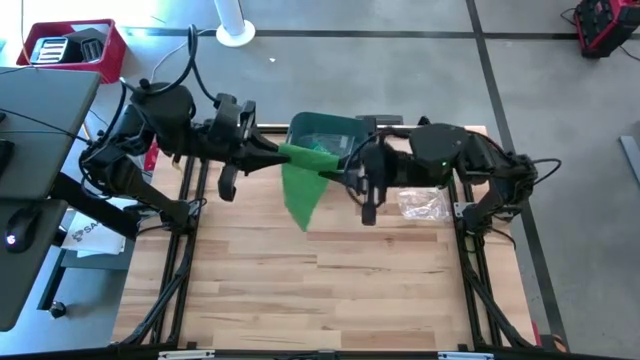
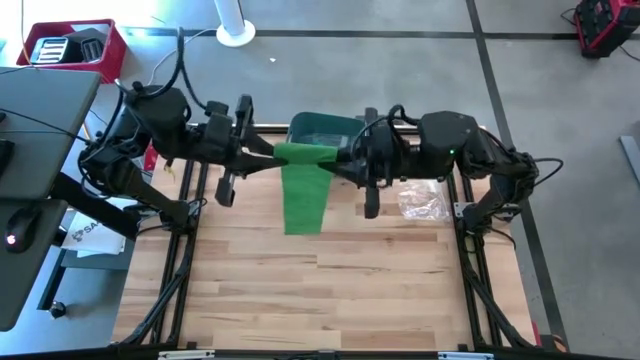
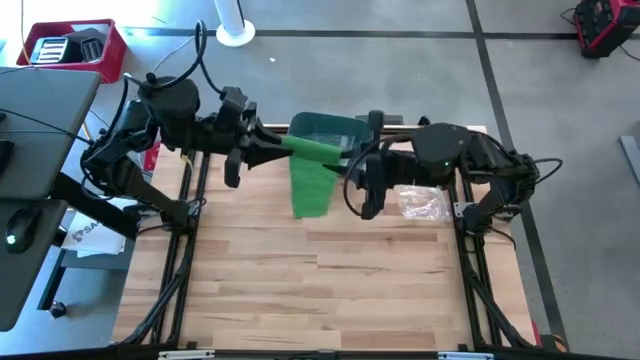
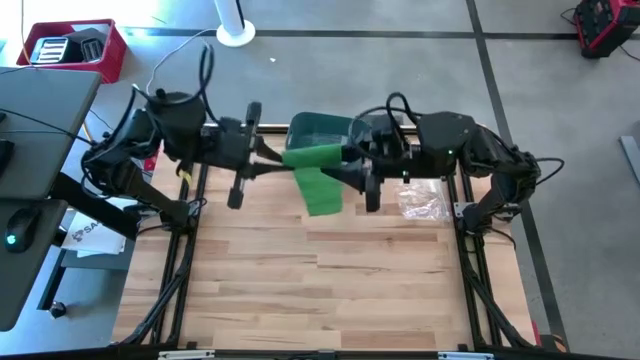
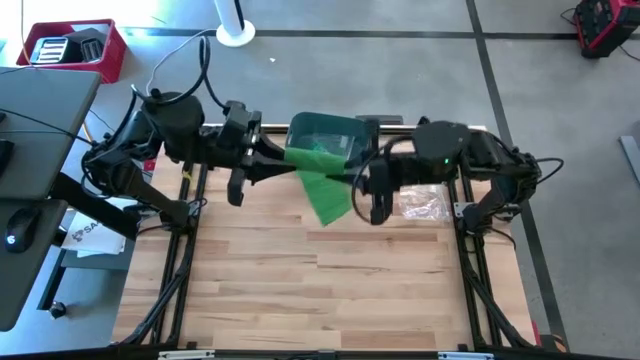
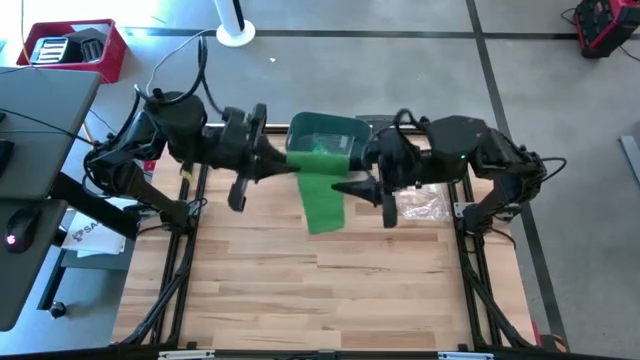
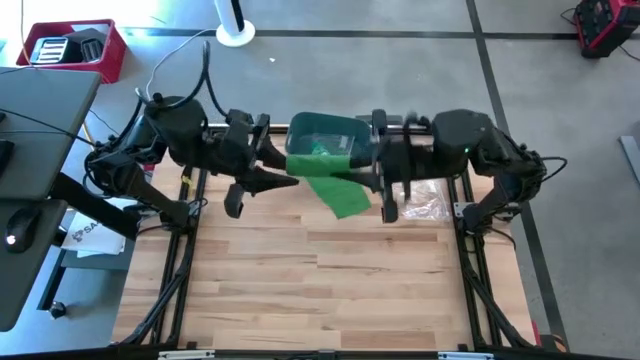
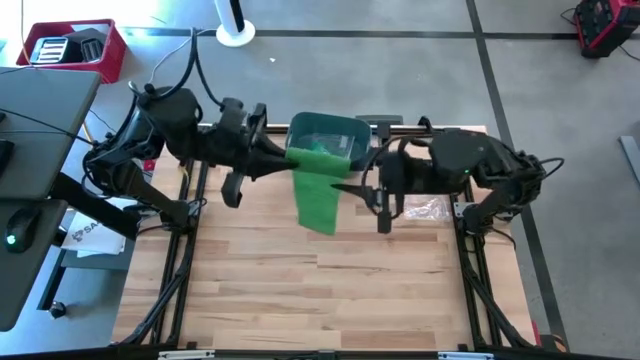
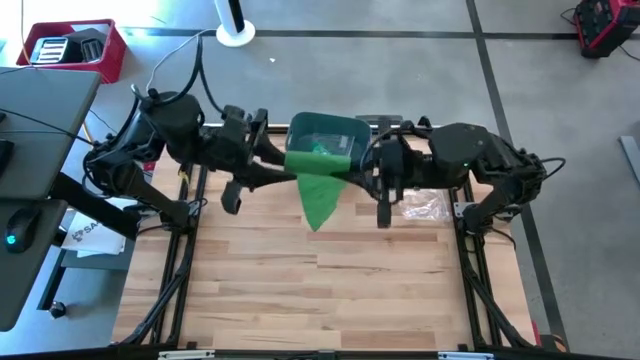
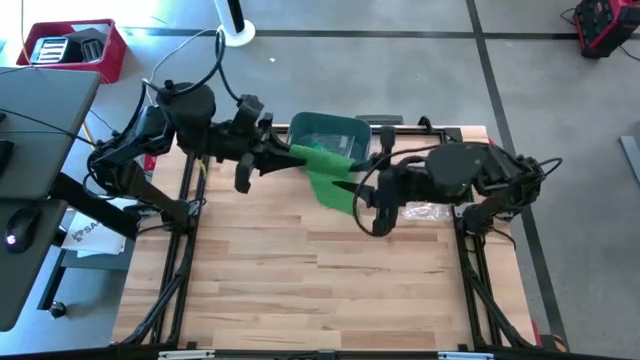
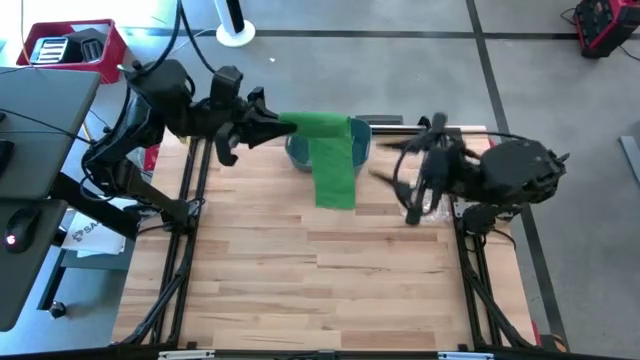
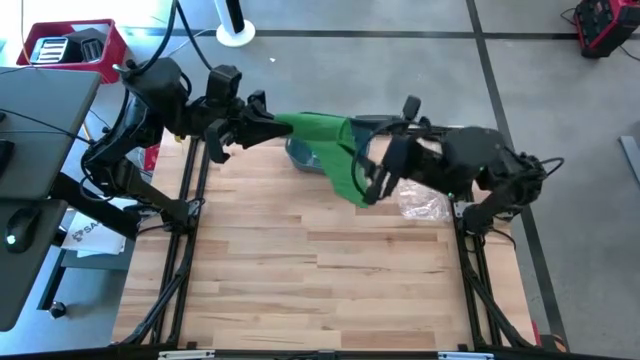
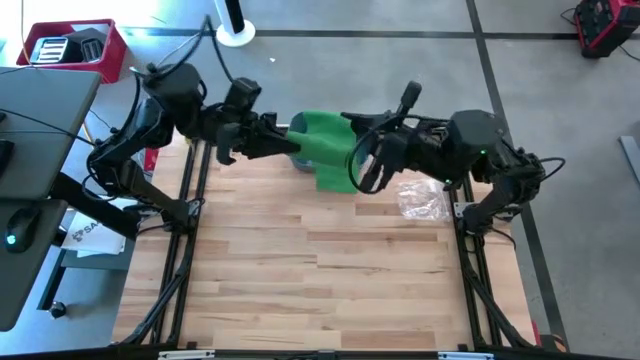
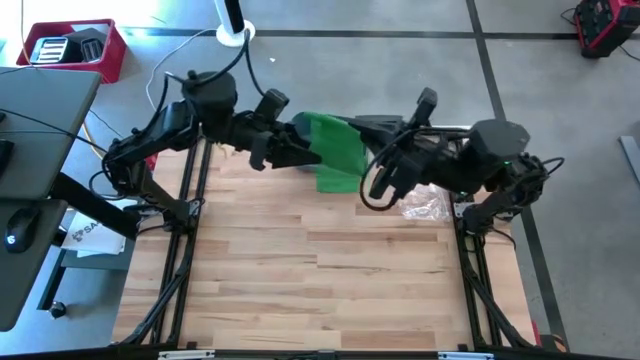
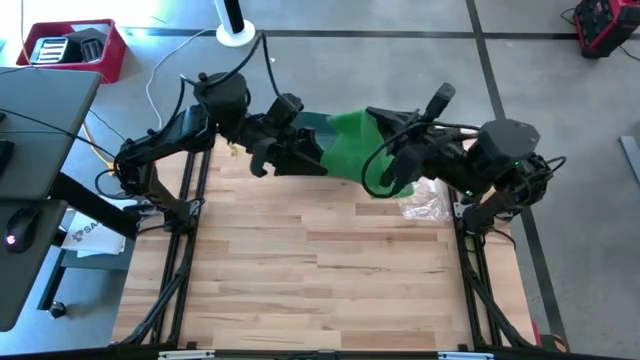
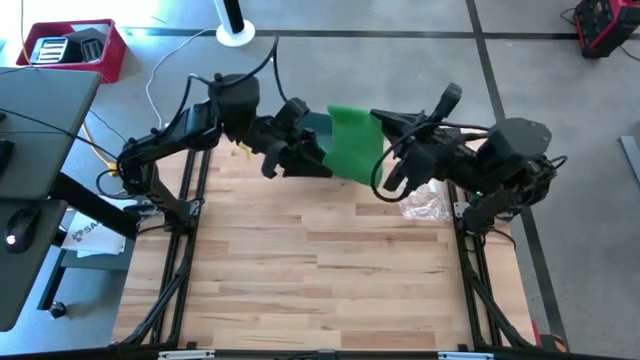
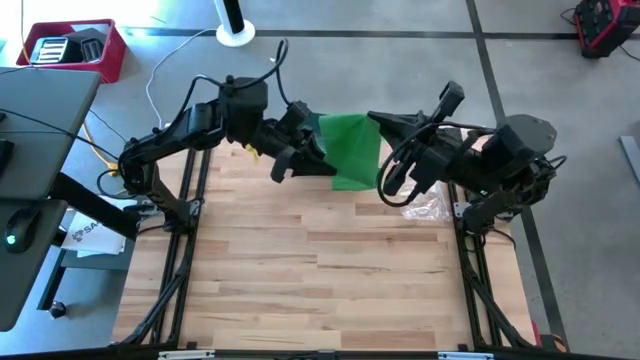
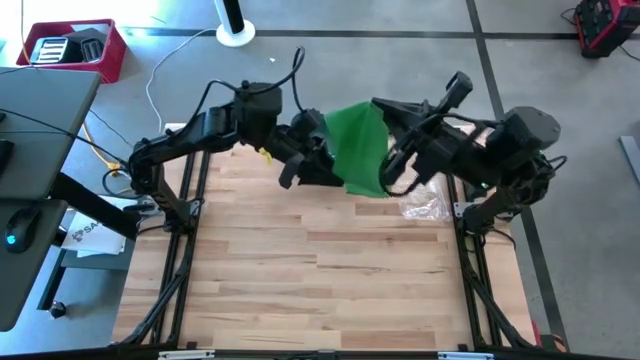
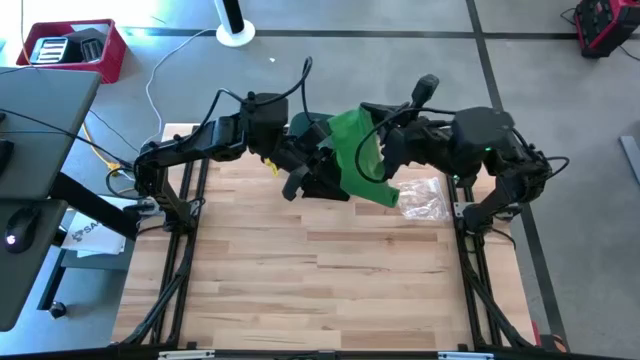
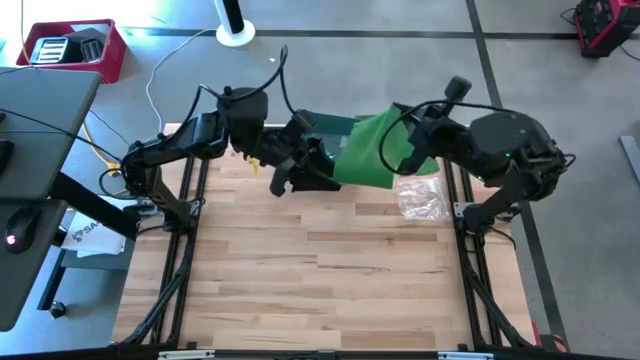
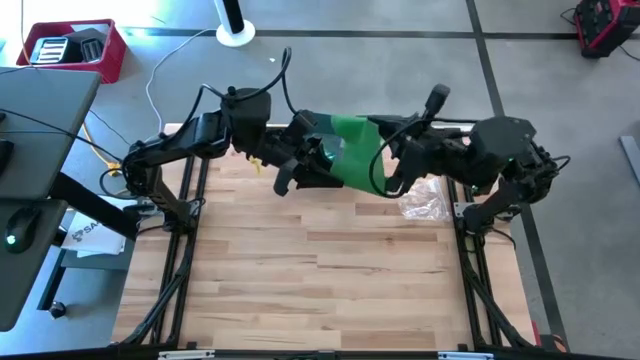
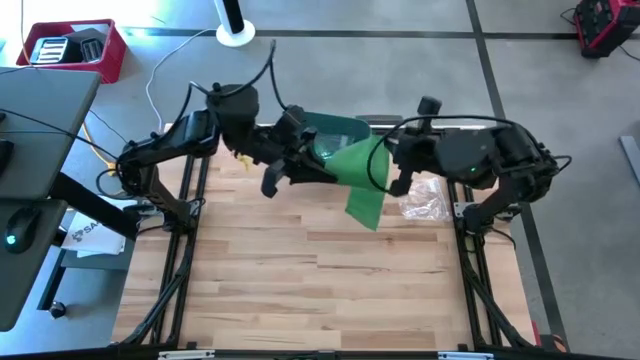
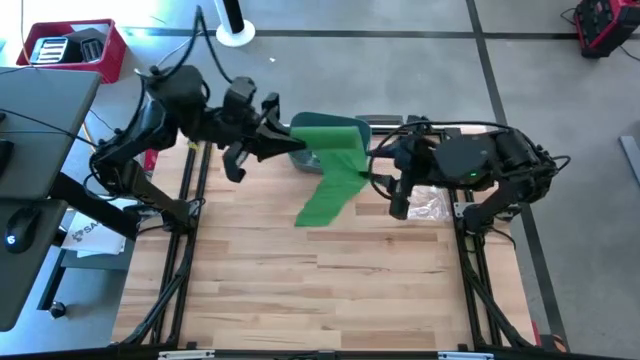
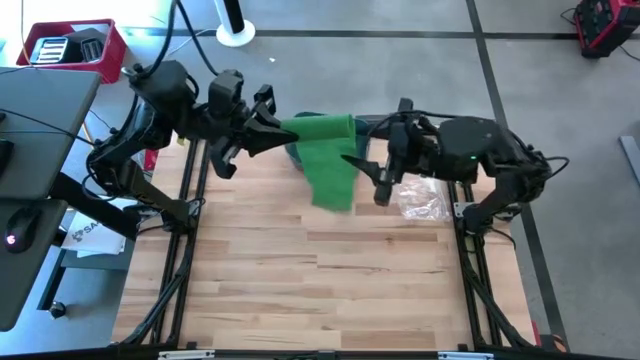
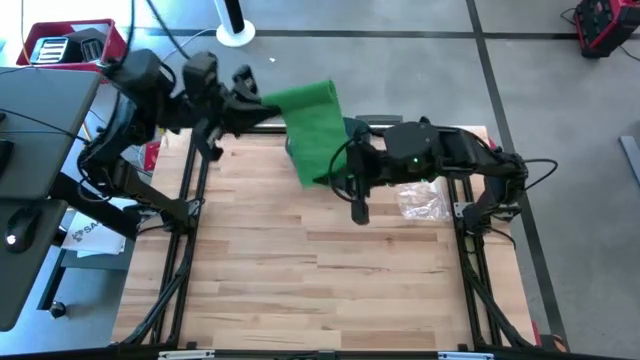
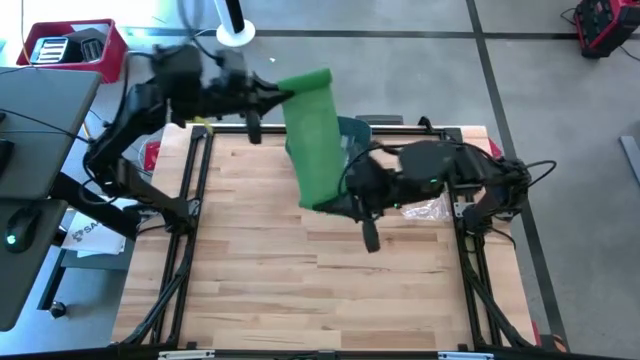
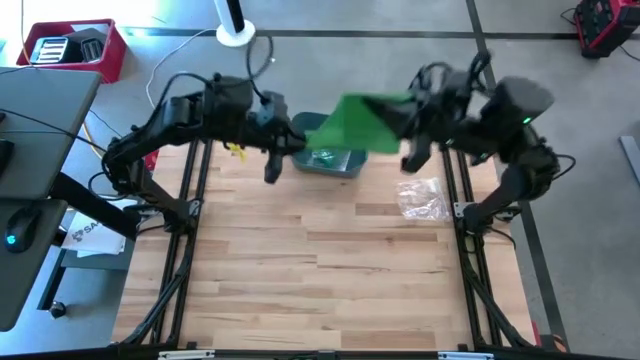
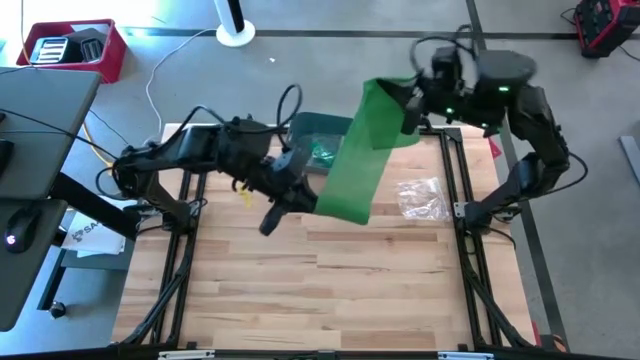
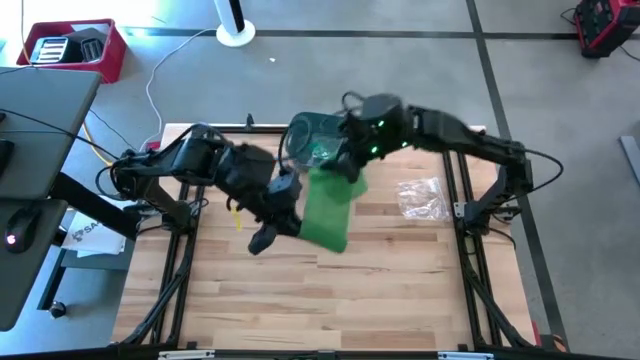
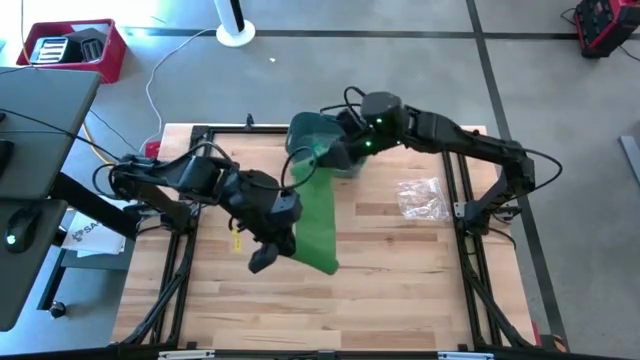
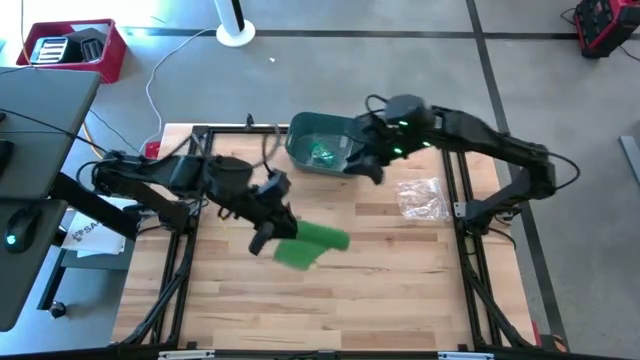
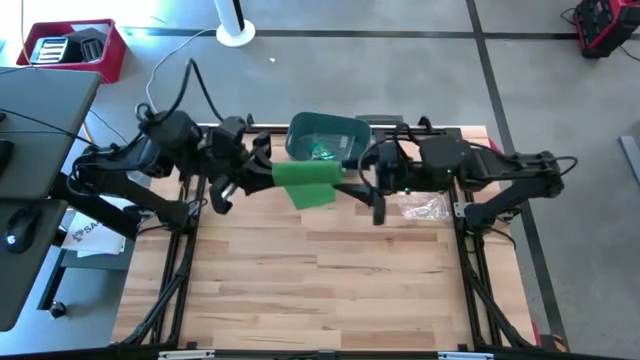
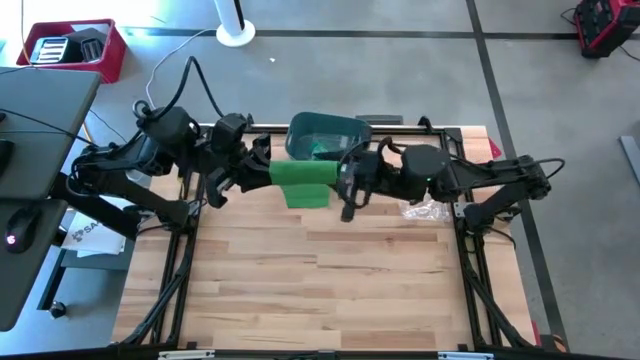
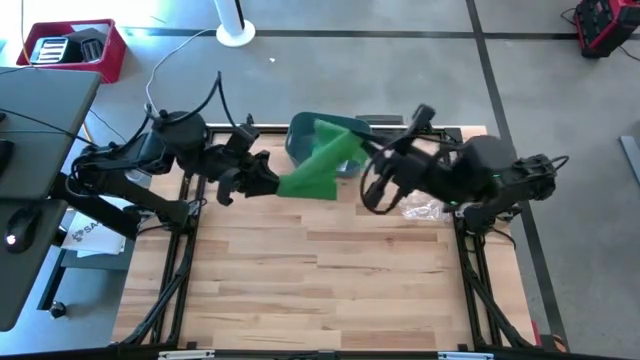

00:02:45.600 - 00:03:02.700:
Task: Roll bandage
Roll the green bandage

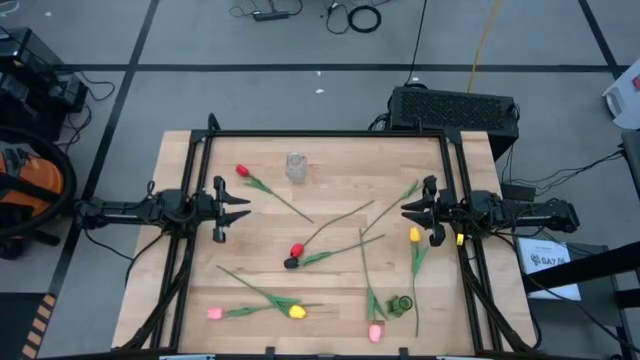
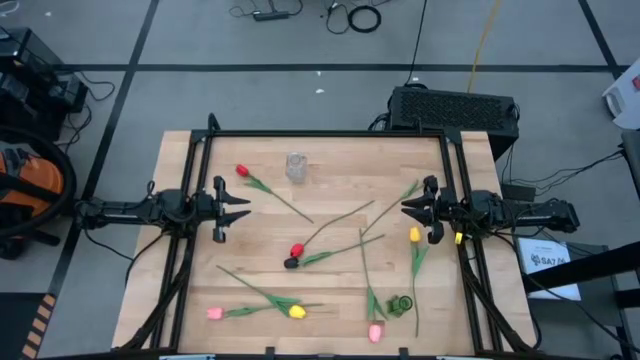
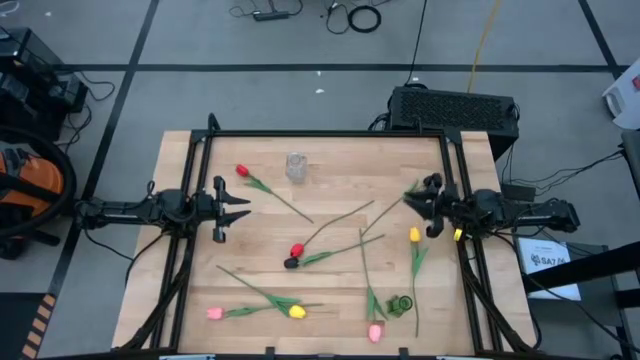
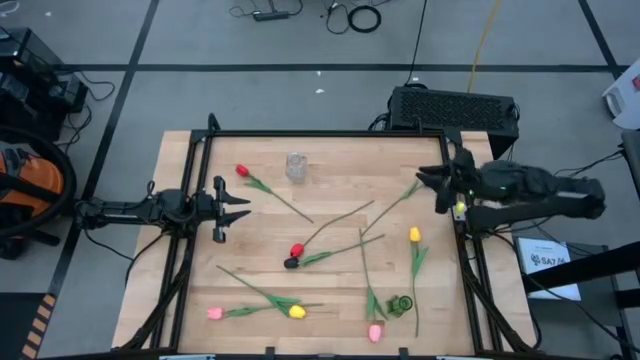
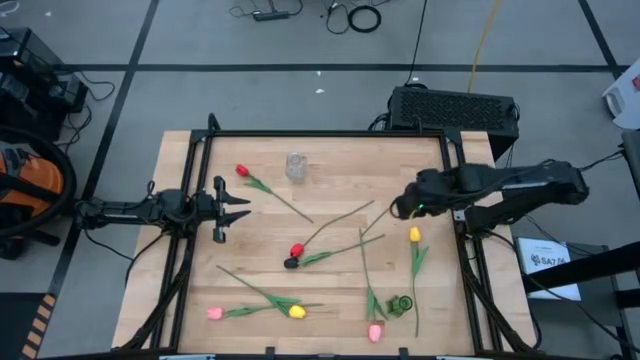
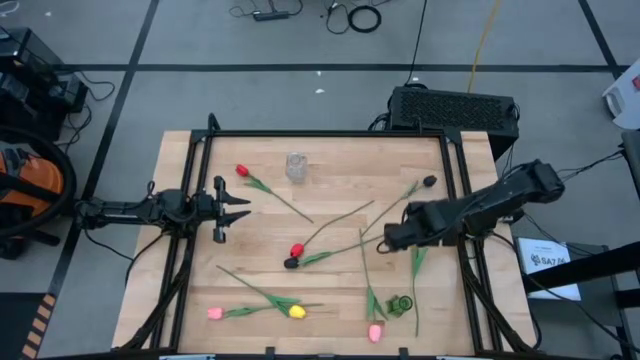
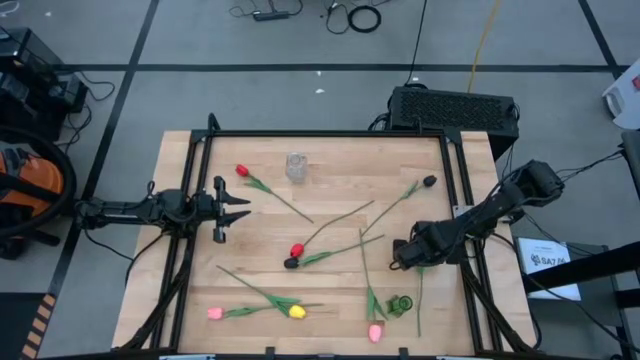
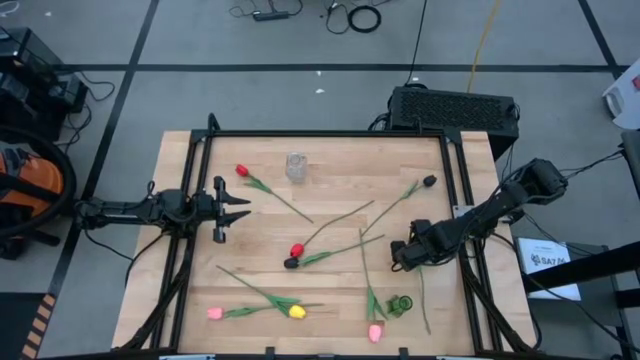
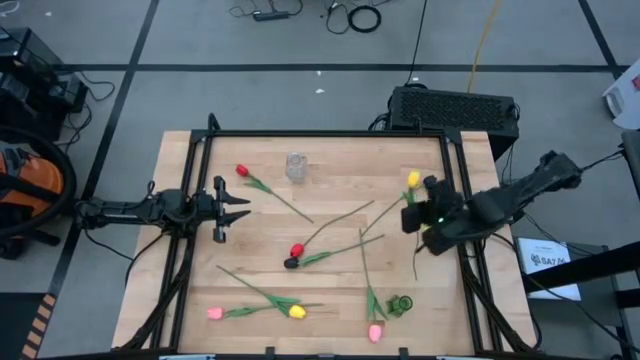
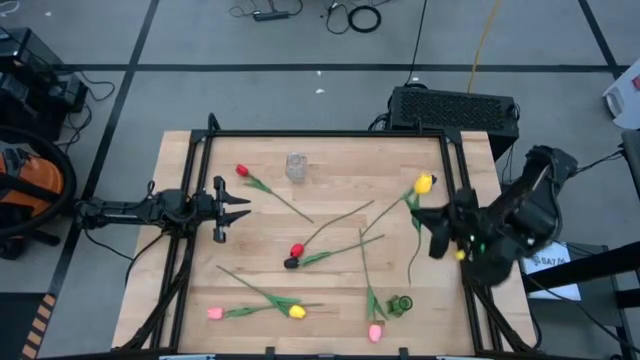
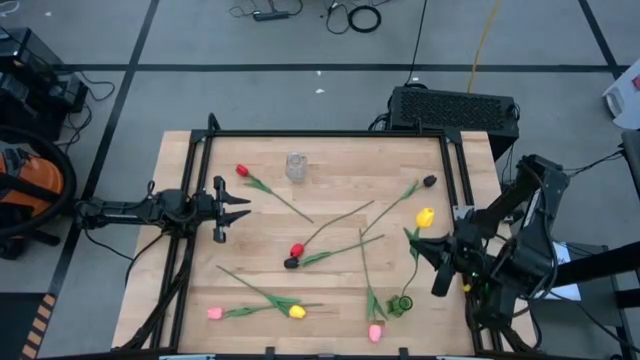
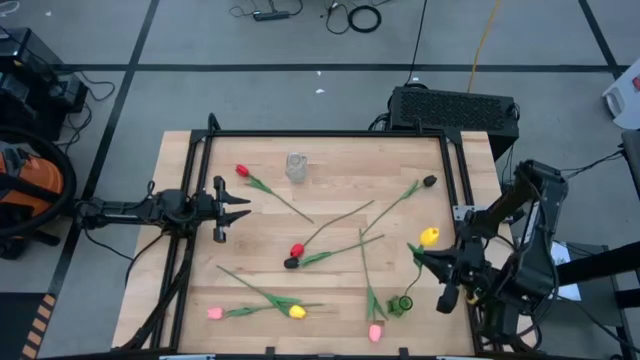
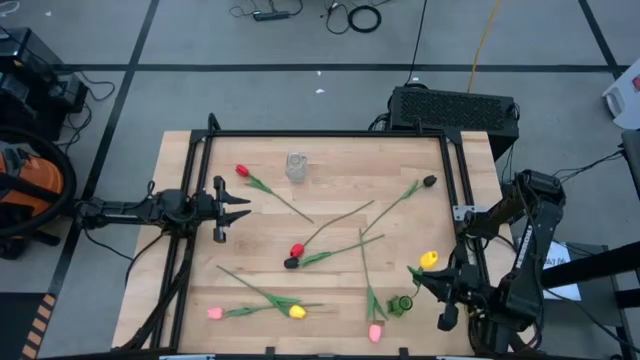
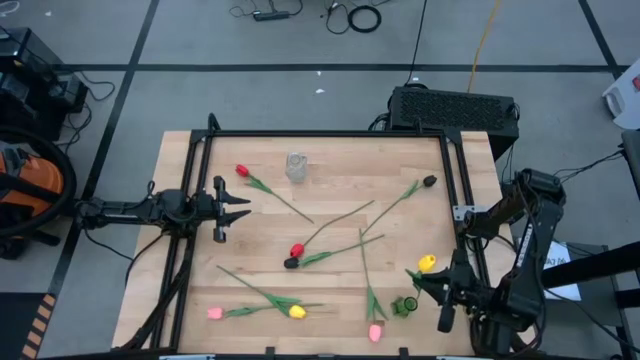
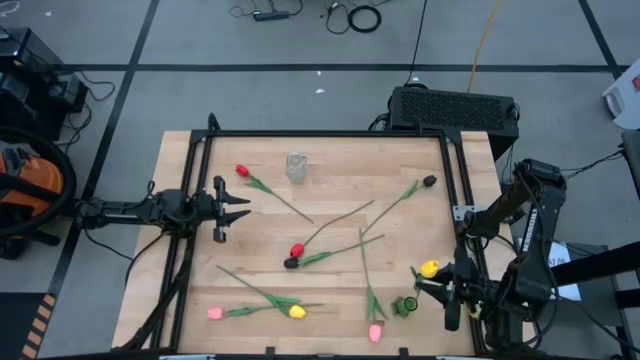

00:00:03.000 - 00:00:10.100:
Task: Sort flowers into vase by color
Put the right yellow tulip into the green flower vase
